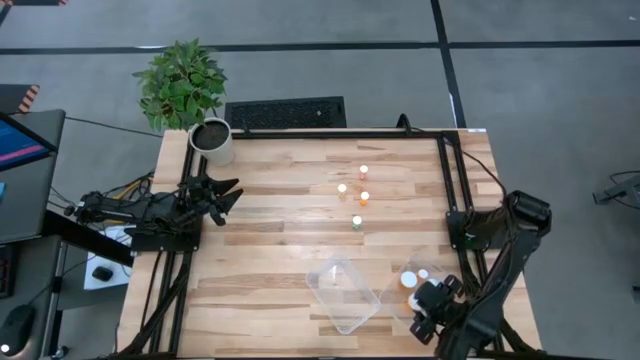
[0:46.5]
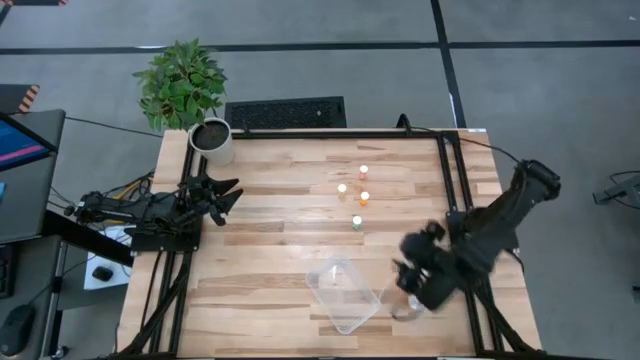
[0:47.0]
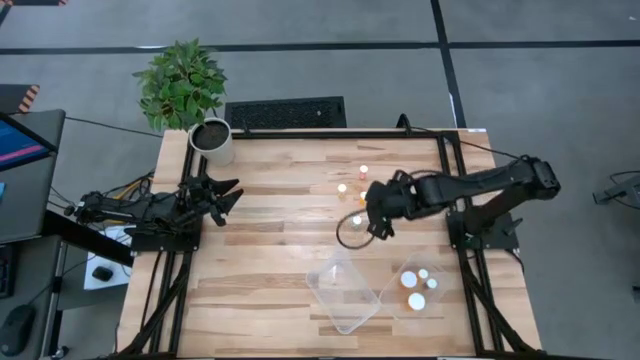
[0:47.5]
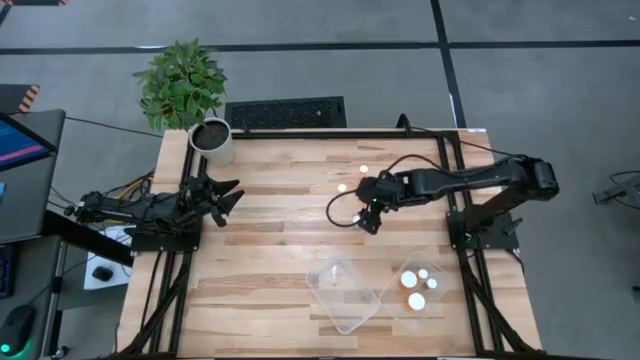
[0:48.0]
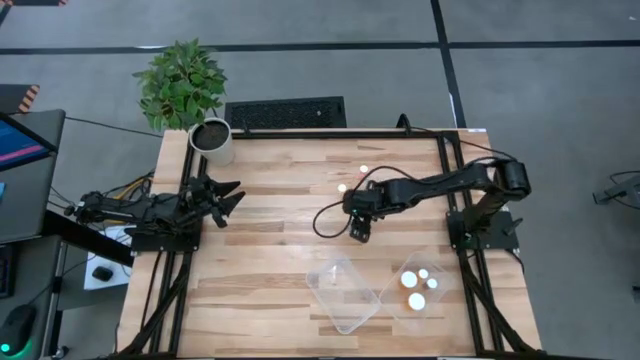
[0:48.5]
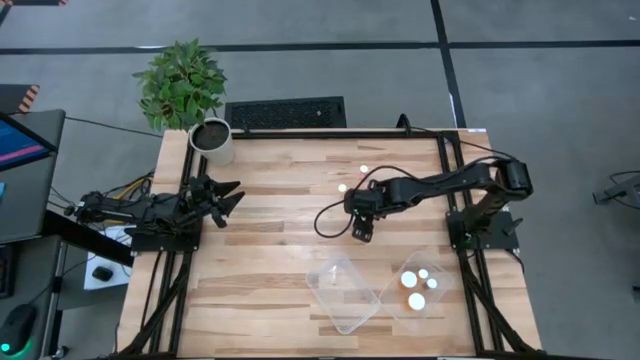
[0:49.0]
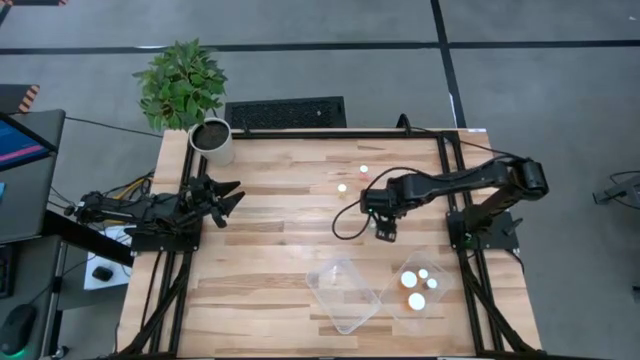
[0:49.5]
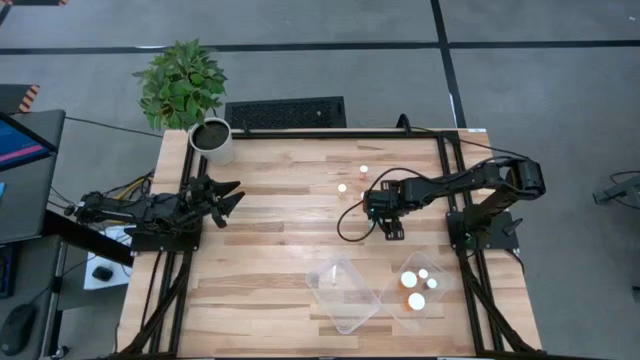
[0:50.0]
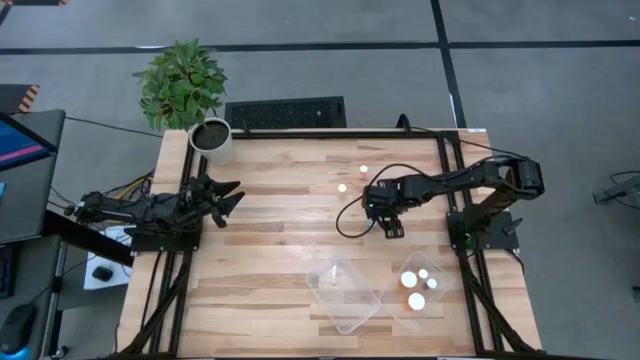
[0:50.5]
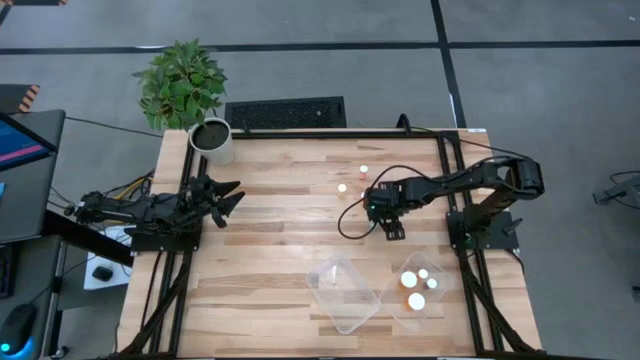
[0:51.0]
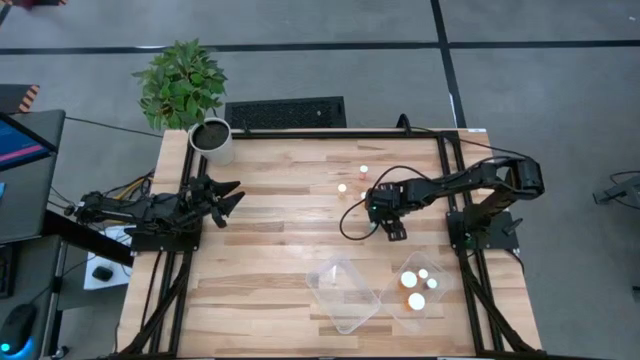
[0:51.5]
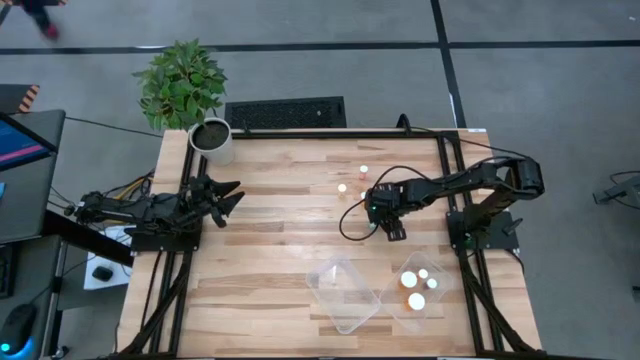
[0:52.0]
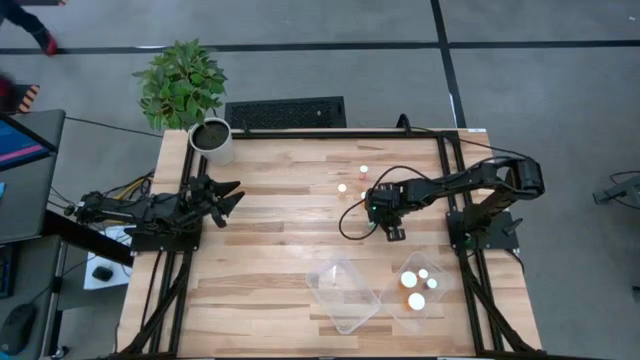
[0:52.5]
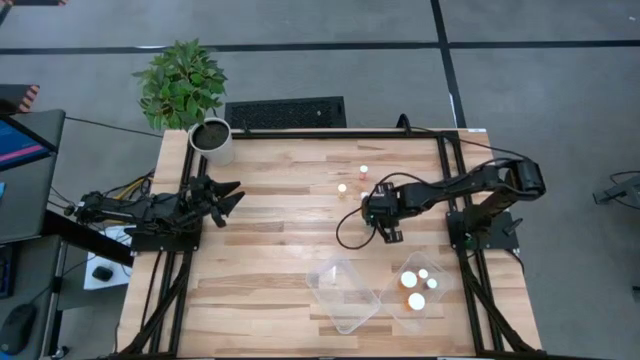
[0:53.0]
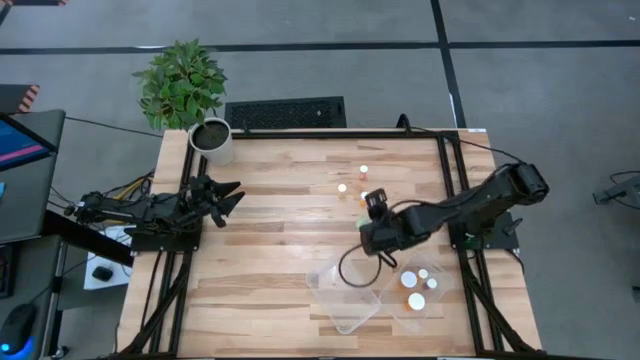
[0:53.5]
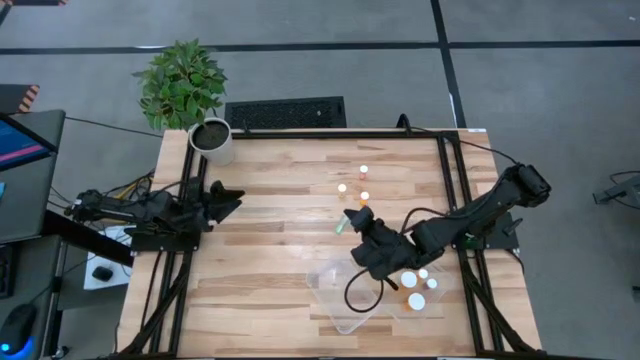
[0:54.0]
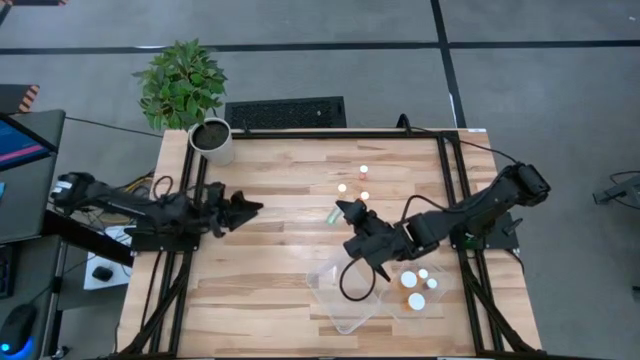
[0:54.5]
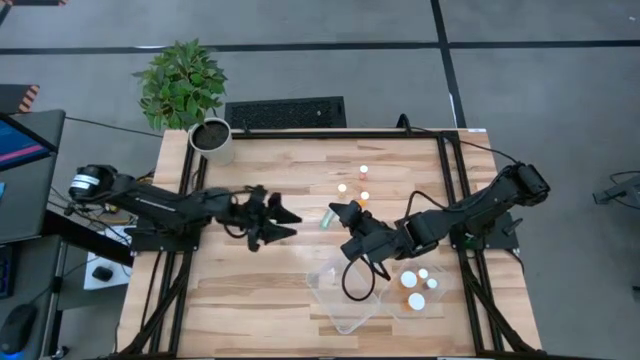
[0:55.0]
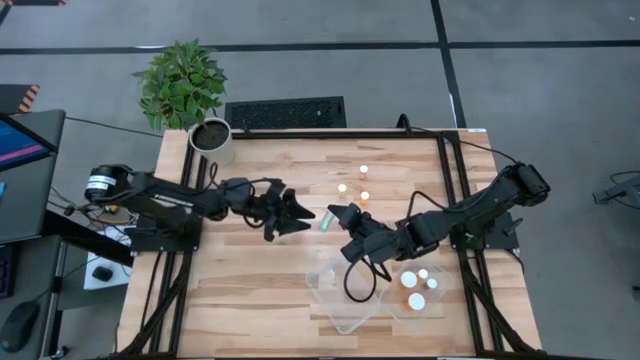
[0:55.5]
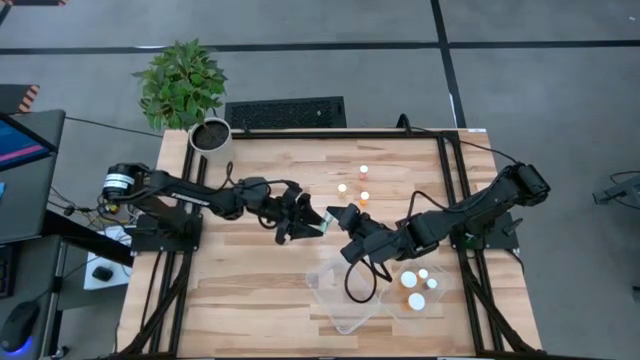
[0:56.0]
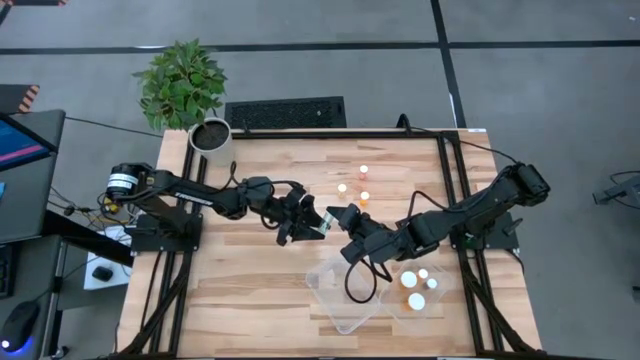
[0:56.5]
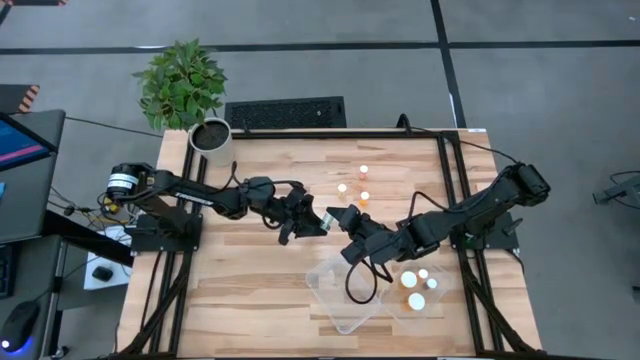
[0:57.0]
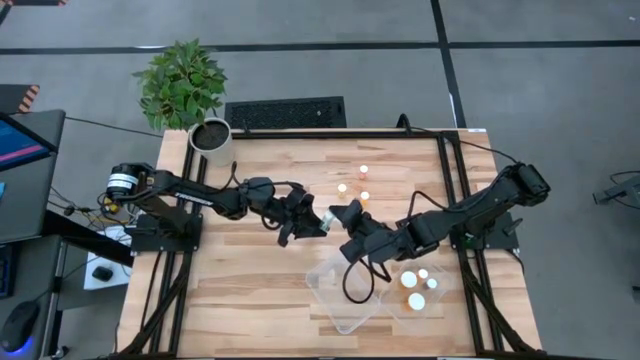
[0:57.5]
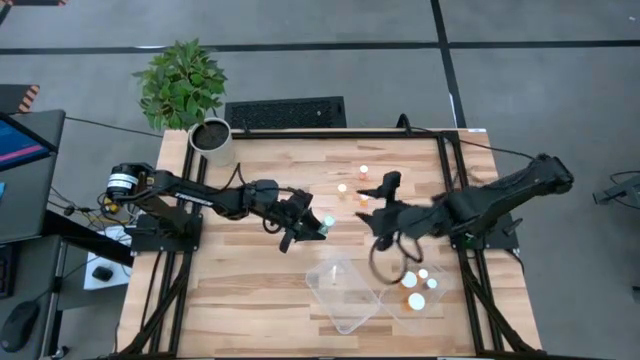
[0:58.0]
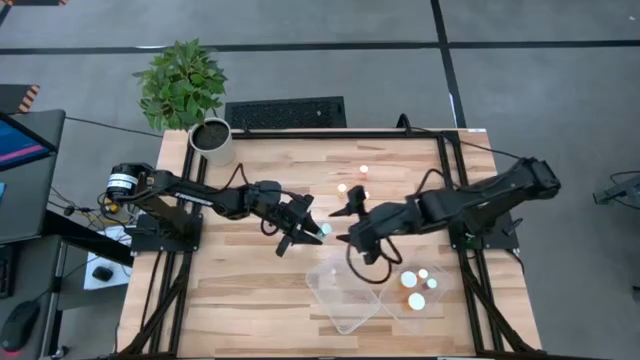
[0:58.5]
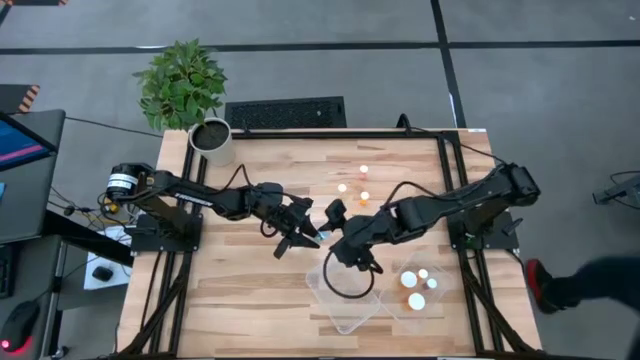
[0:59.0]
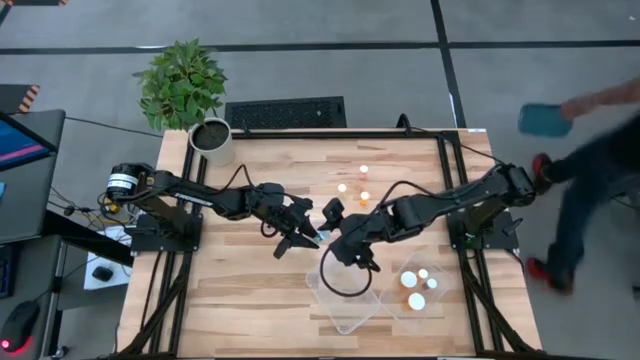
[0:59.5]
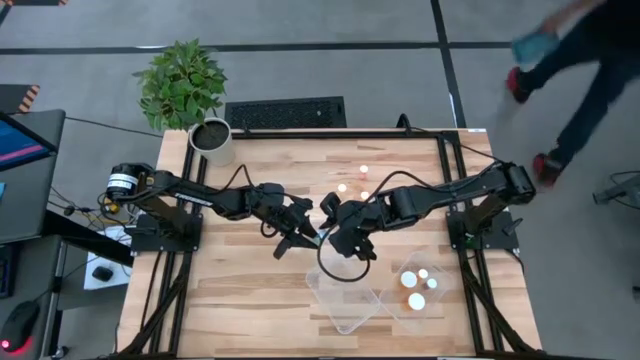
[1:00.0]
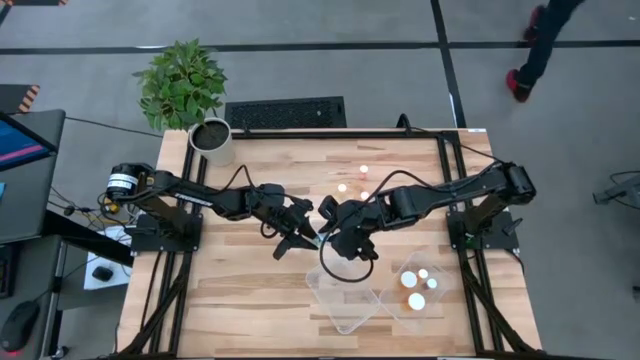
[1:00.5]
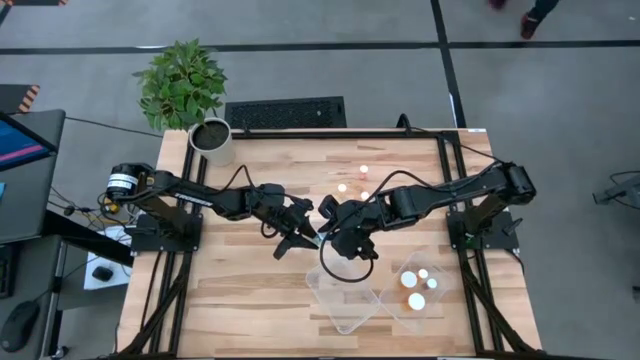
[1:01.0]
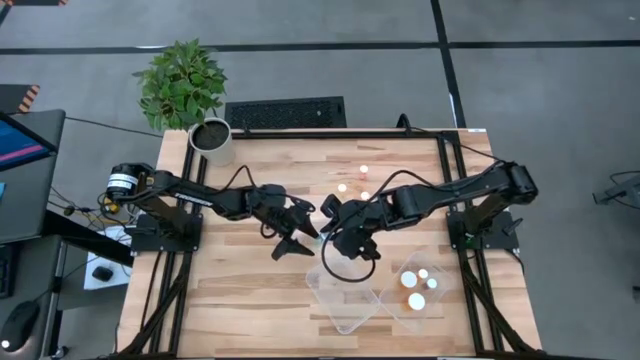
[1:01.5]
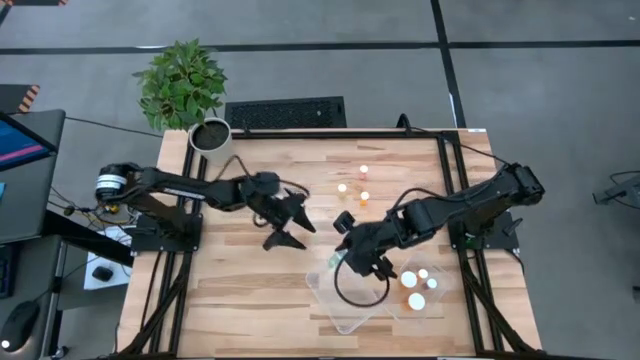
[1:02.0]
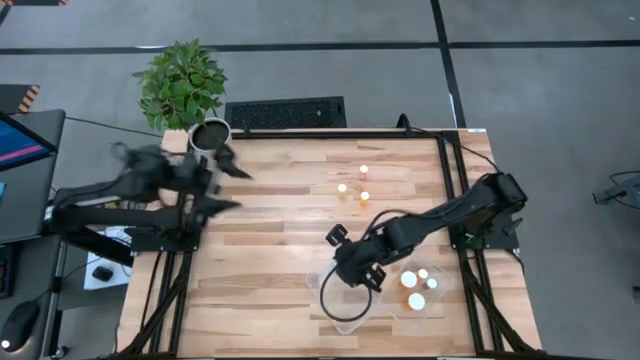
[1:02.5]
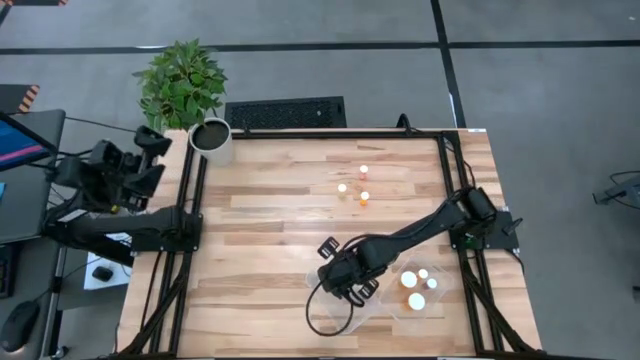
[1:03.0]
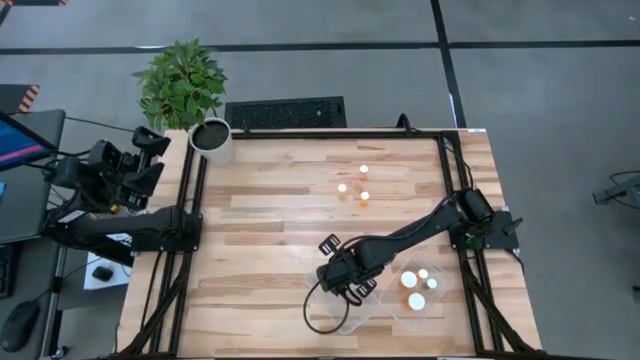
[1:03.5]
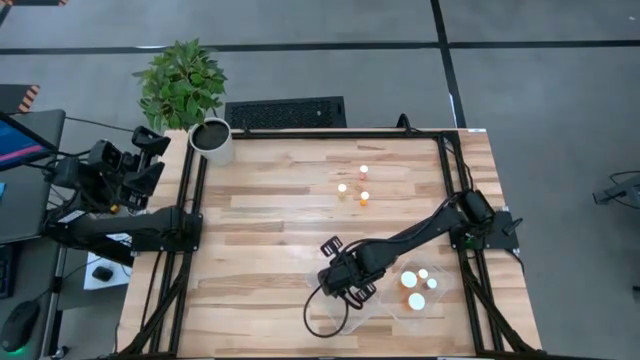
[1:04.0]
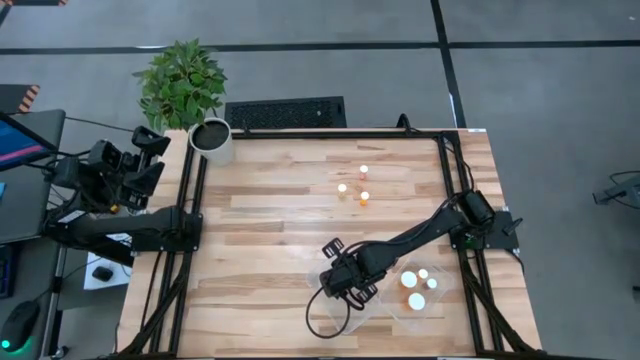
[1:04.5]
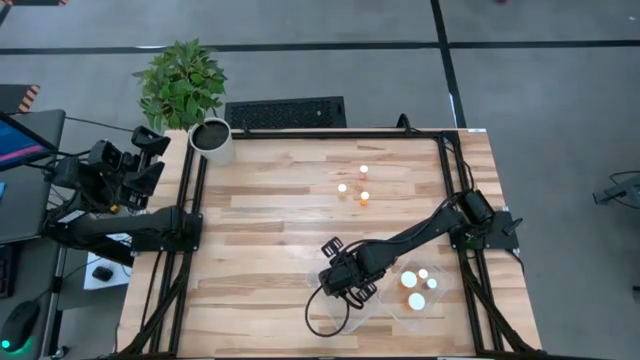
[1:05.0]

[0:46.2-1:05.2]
Task: Pick and place medicine bottles into bin by pill shape (circle, oval)
Put the green pill bottle into the left transparent bin
